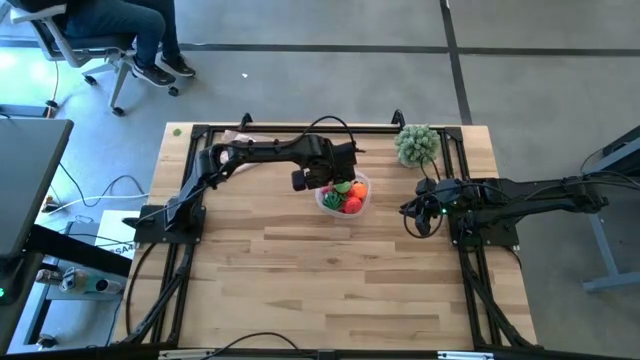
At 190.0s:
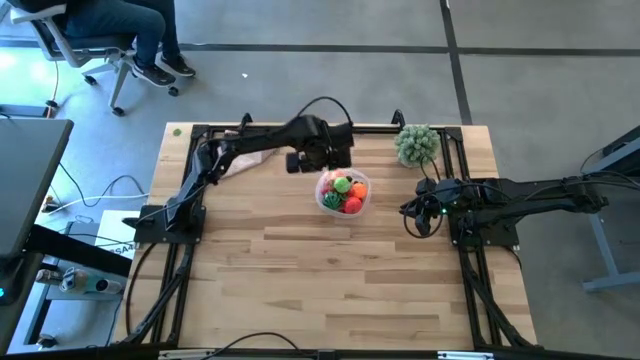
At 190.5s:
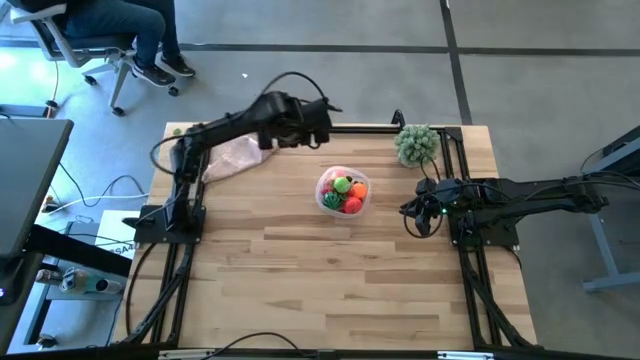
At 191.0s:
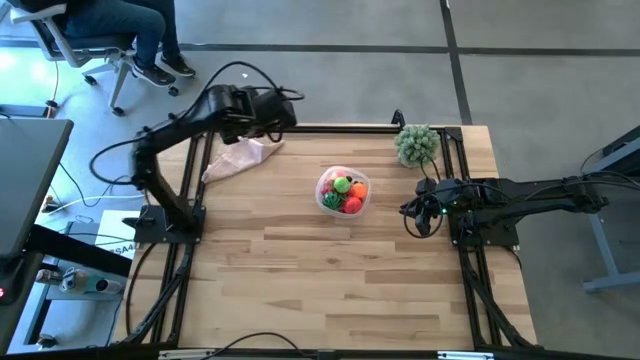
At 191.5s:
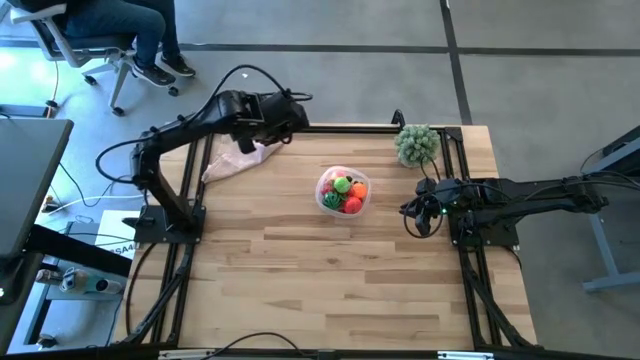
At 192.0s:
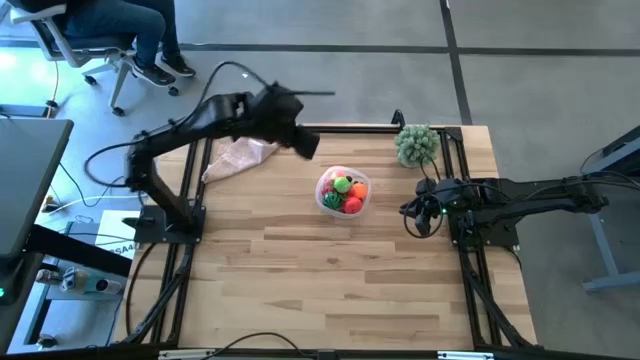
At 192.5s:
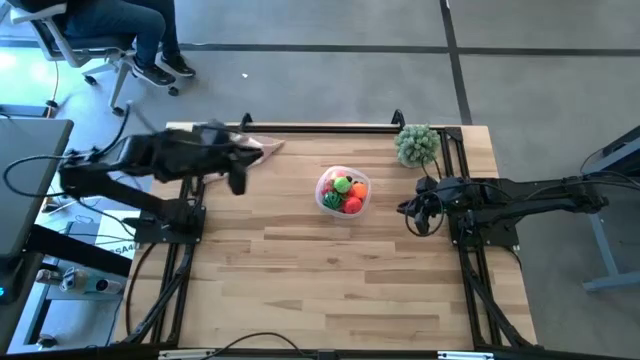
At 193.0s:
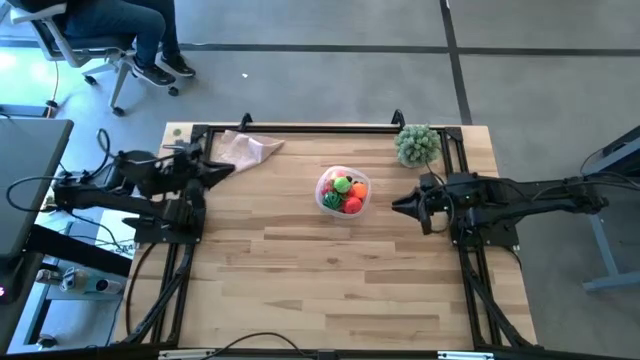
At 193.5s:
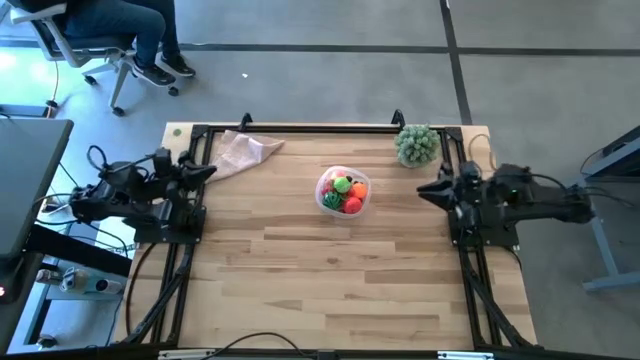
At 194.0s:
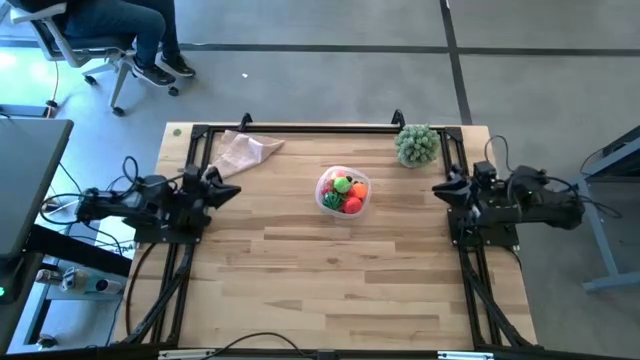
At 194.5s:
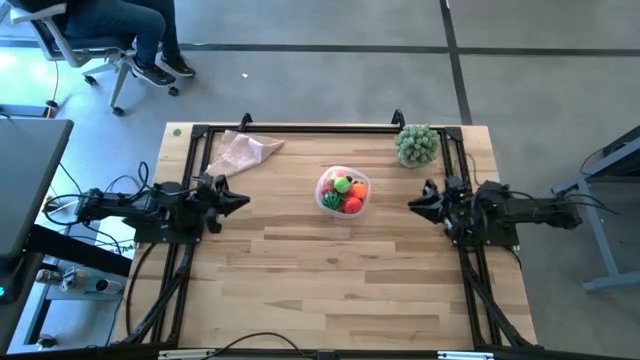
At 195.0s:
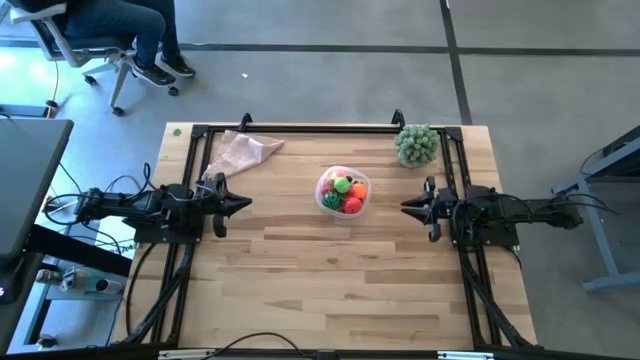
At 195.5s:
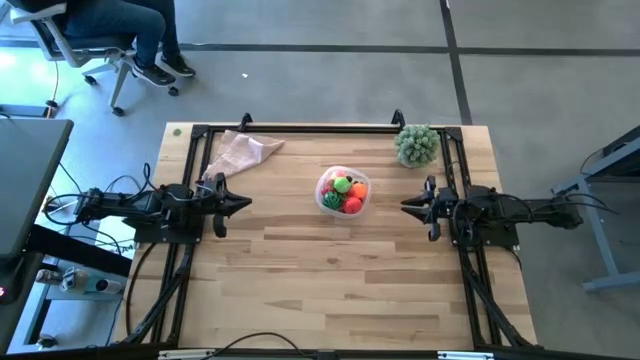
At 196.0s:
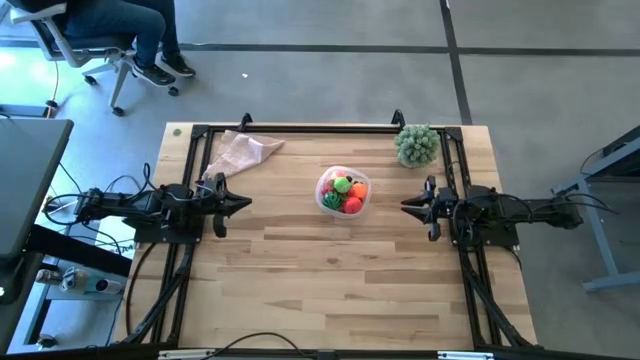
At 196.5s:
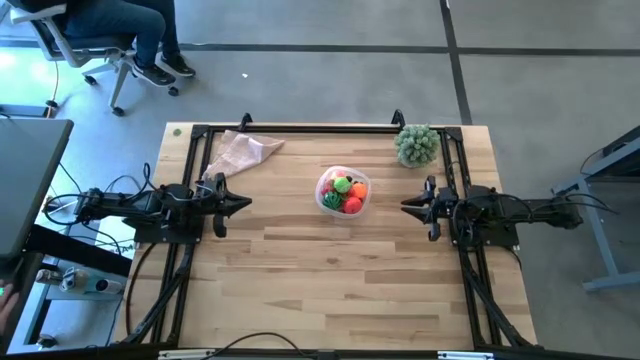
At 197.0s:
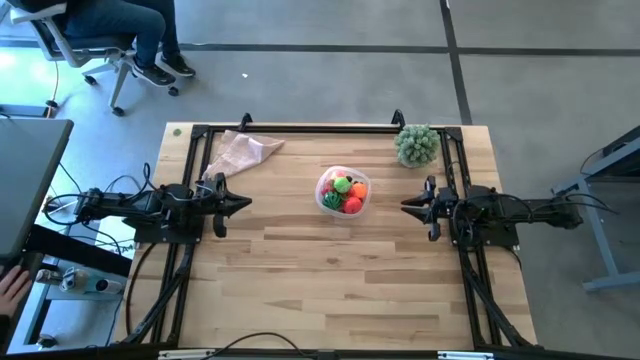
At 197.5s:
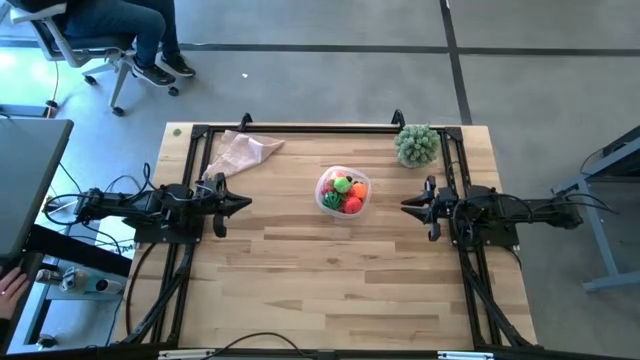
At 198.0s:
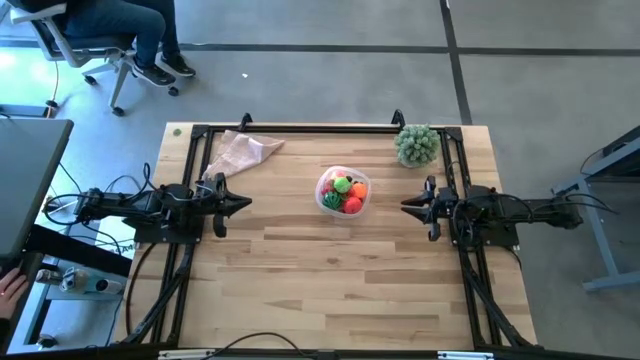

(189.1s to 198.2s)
Task: Pick and placing Produce into tupperware
Return to Home Position

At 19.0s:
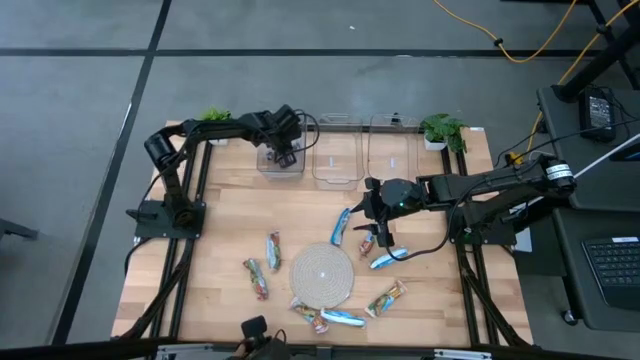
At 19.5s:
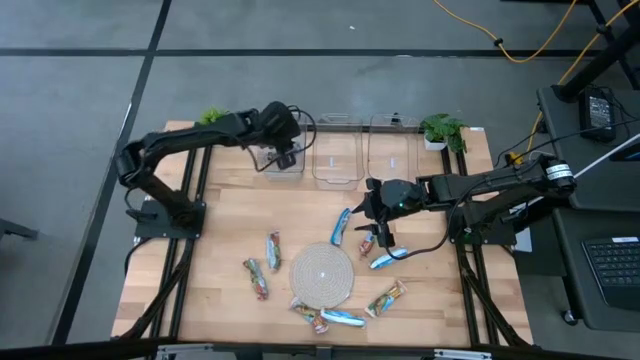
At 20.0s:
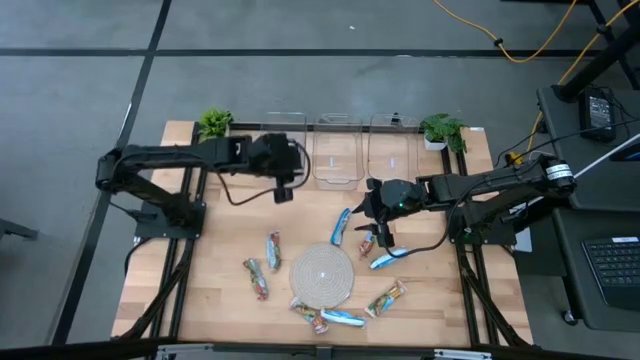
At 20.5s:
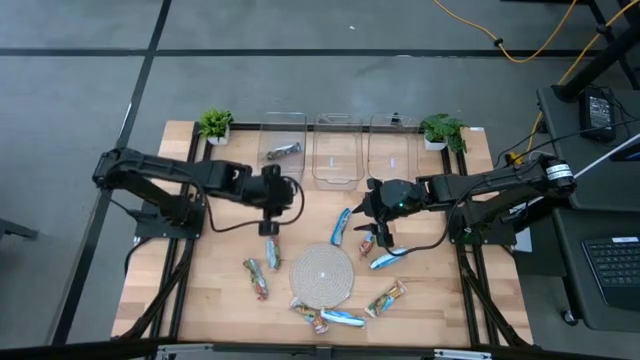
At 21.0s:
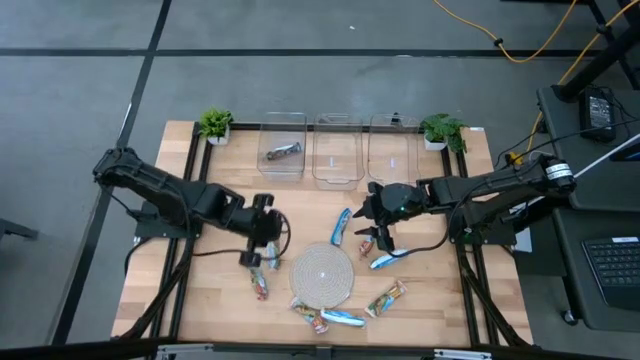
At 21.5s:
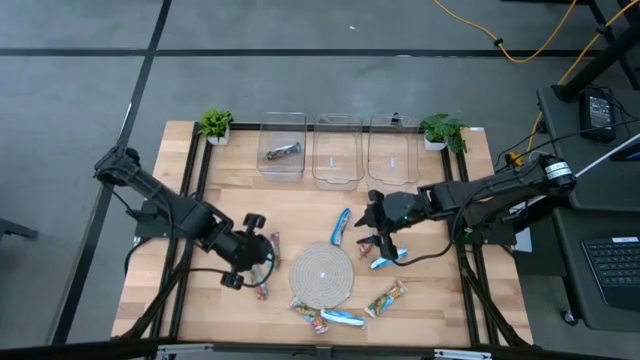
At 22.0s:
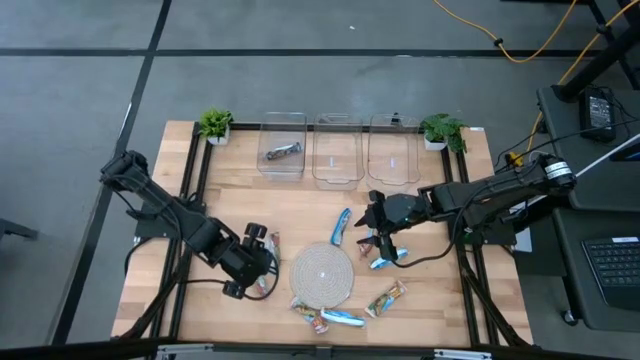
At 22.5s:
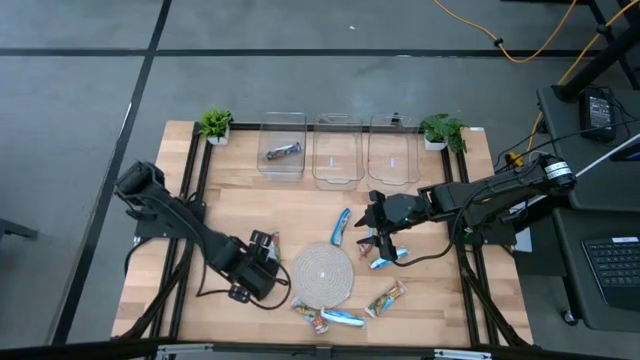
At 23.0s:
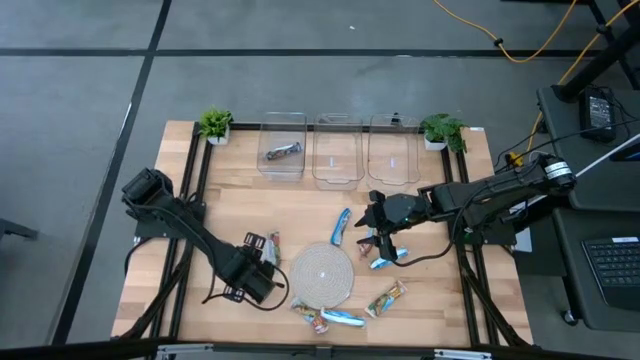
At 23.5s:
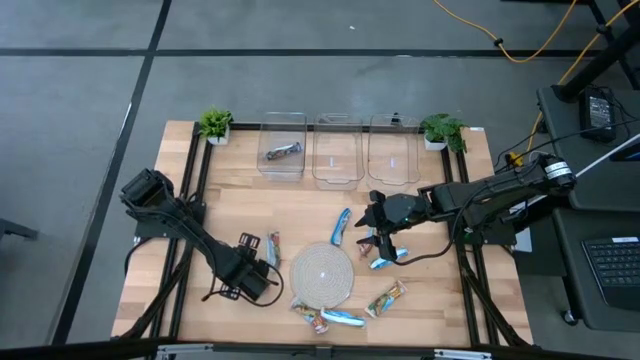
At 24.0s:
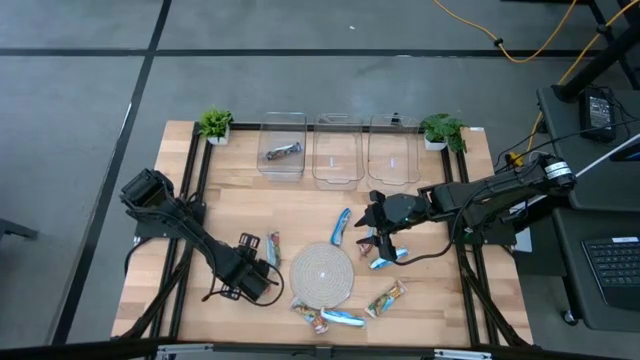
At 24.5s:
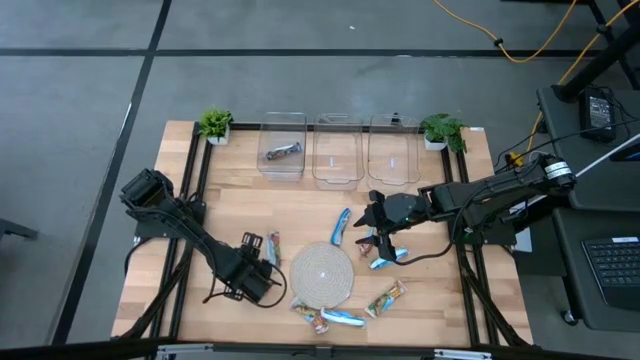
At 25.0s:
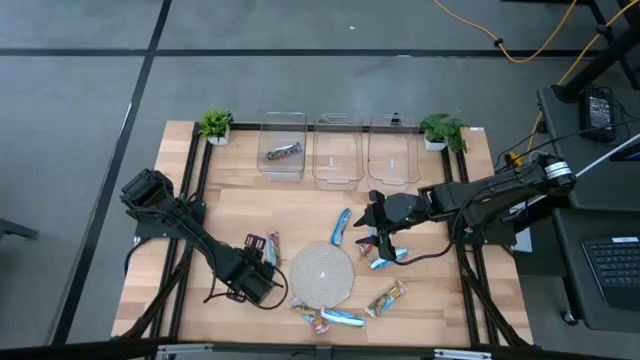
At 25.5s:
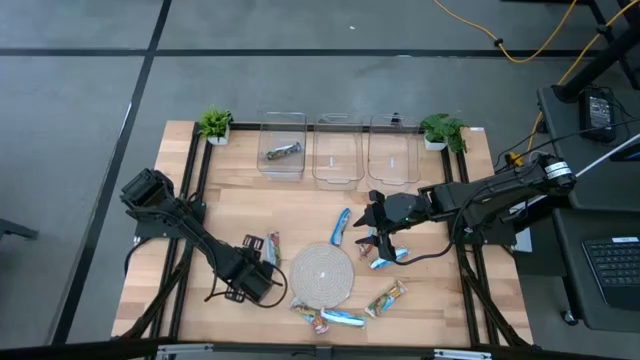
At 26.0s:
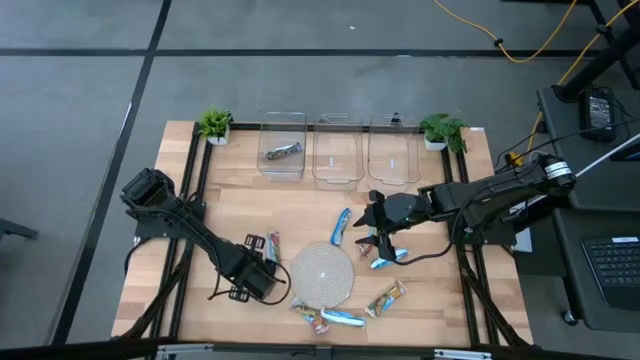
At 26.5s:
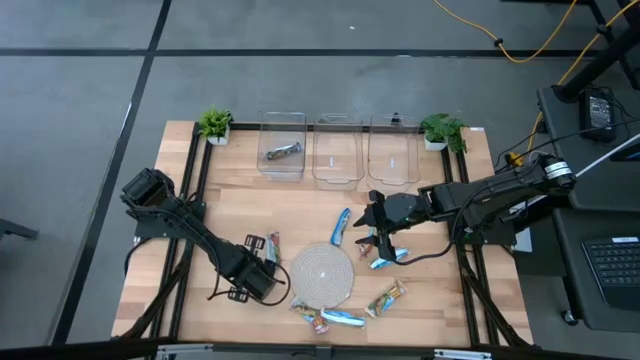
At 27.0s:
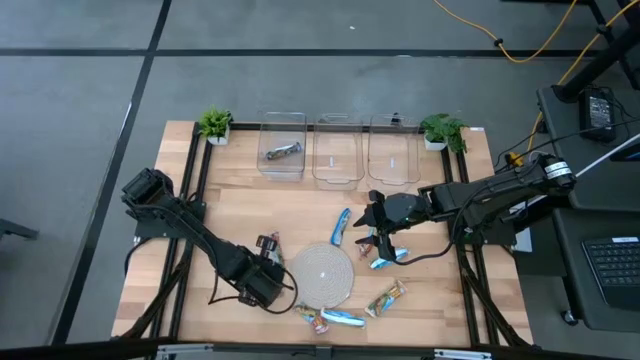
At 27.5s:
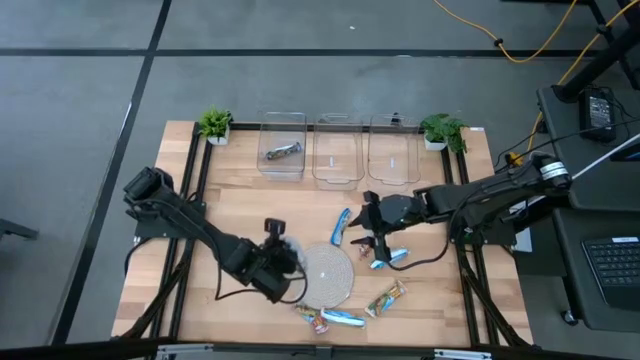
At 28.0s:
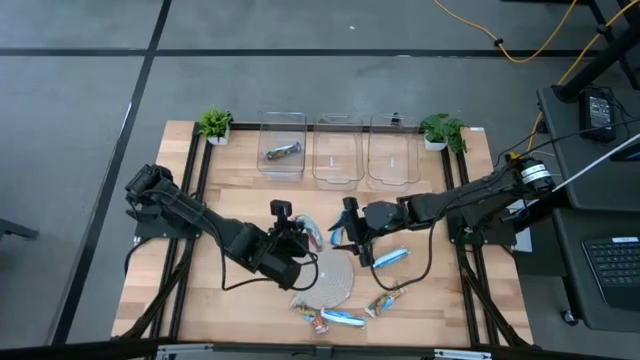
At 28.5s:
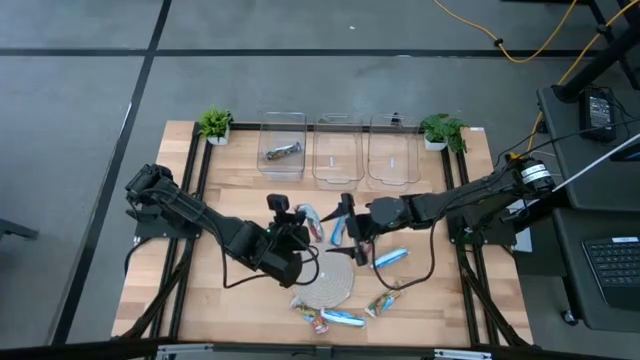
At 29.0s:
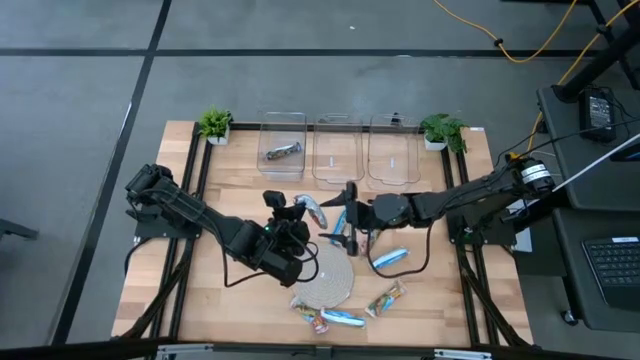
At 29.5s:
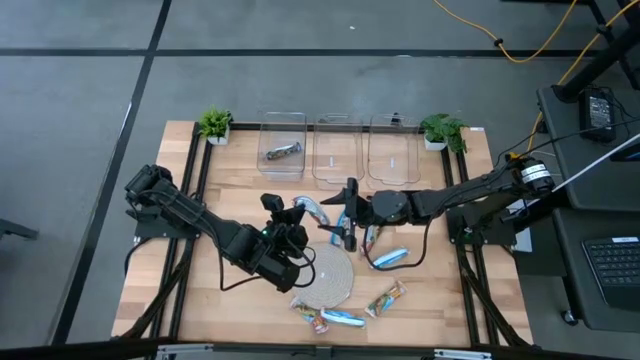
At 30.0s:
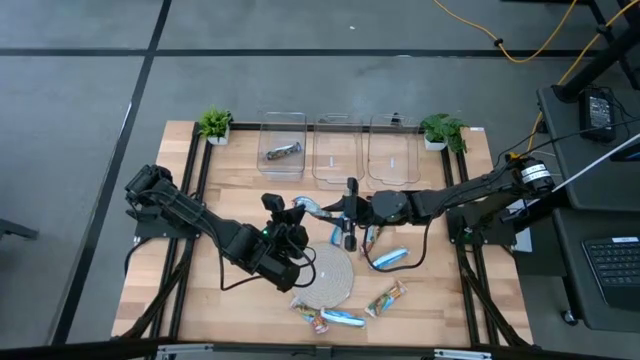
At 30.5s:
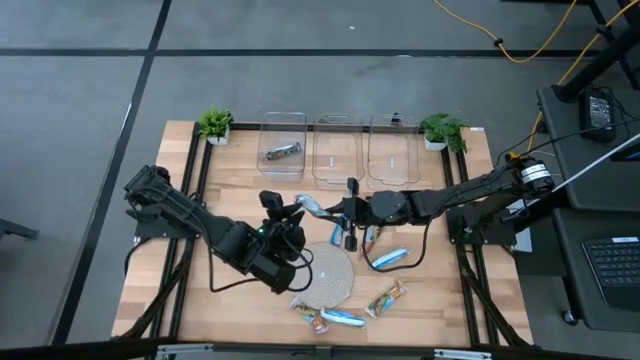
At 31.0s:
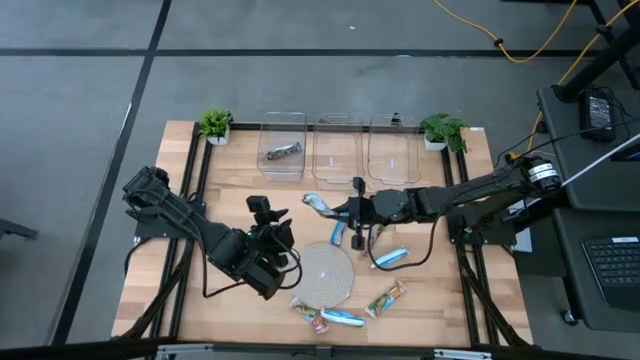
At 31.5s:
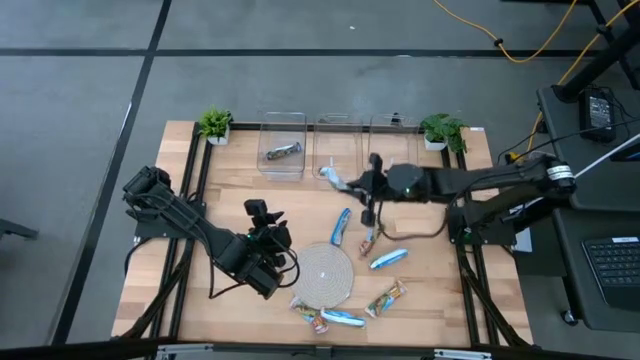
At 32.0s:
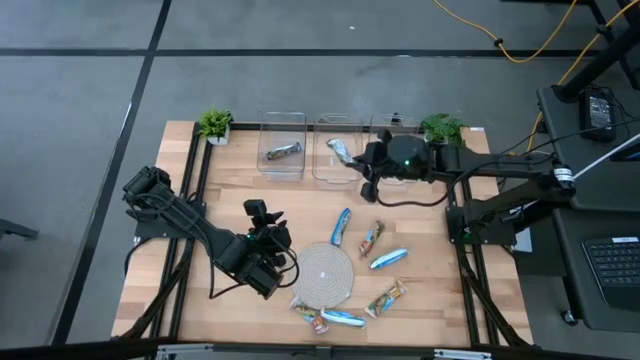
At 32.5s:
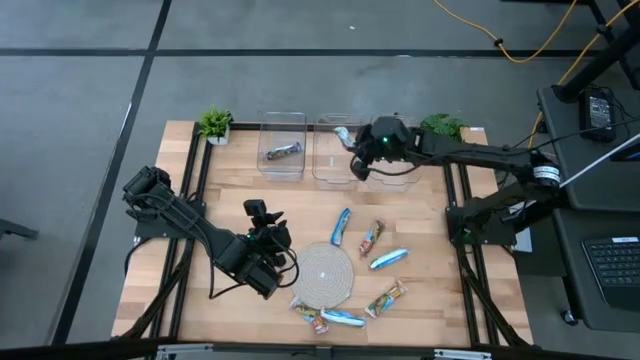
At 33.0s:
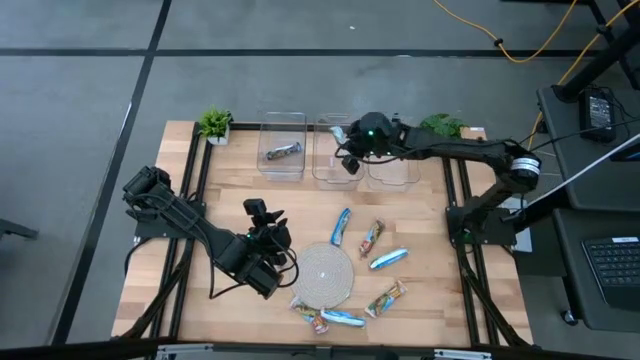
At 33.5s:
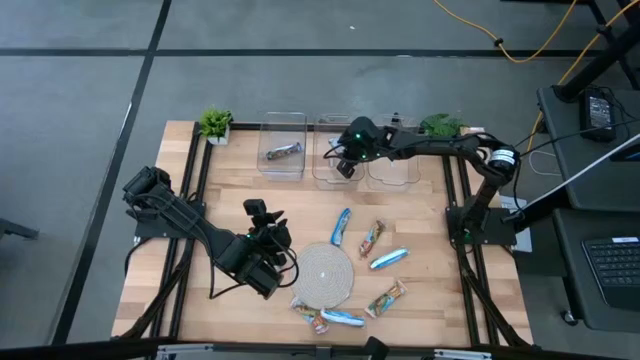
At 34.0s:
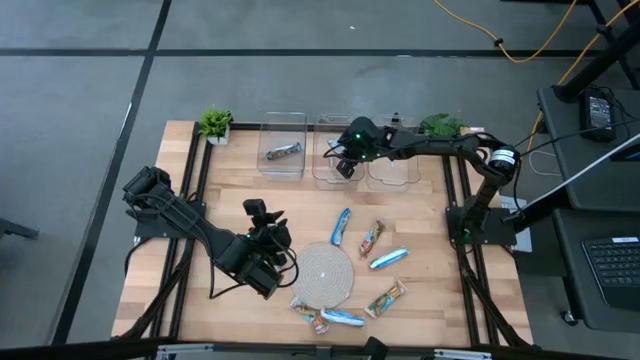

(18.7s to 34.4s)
Task: Pick and place Granola Bars by type
Put the red granola bar into the center transparent bin
